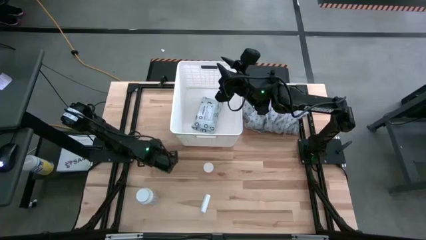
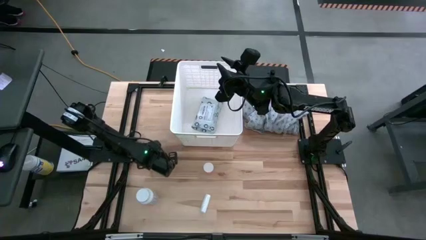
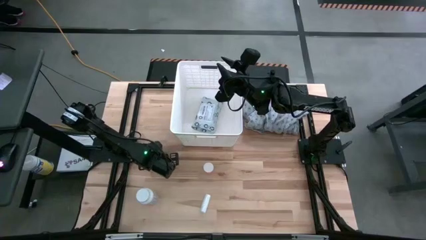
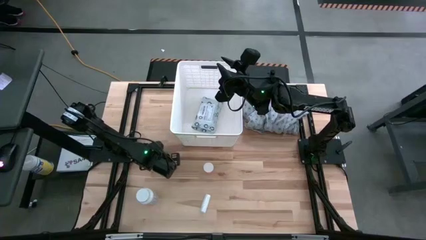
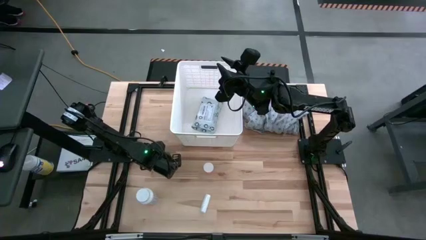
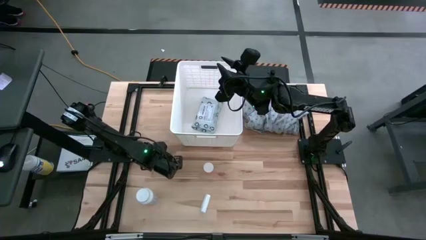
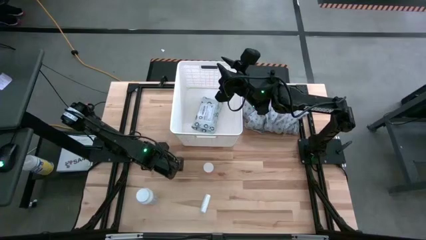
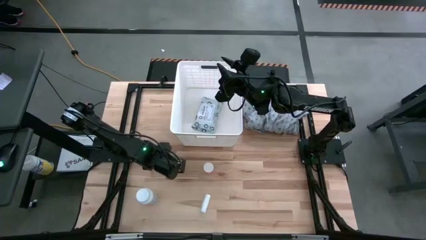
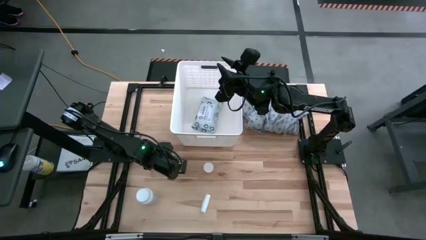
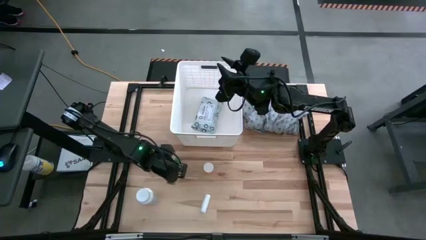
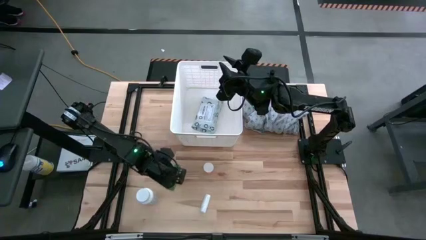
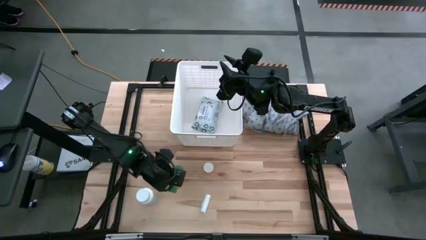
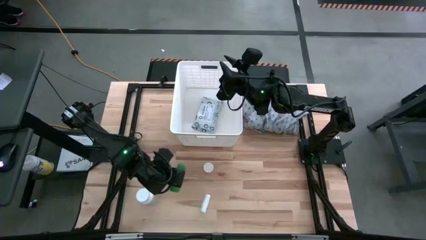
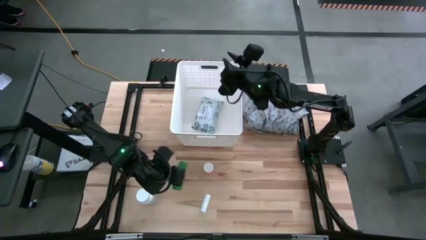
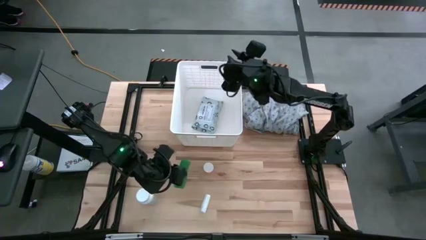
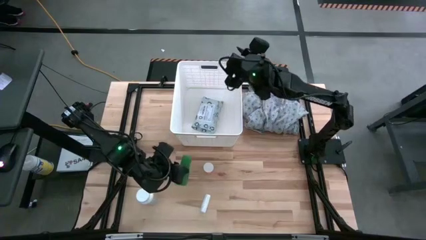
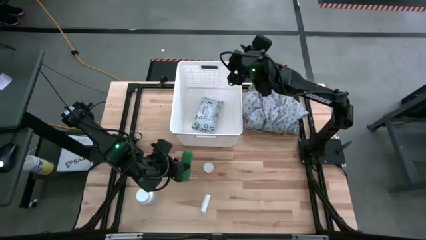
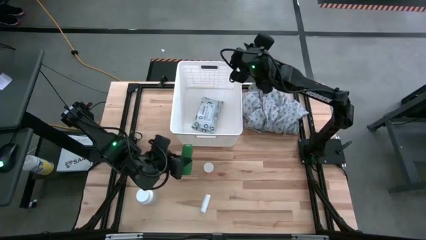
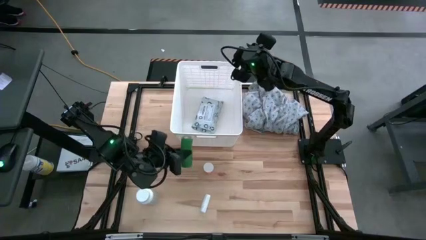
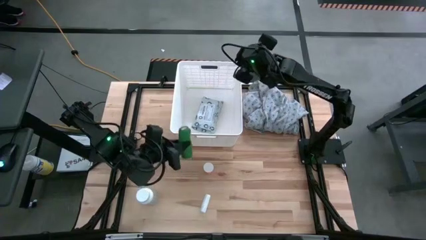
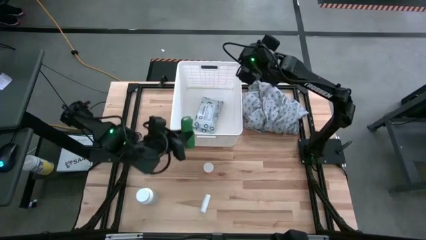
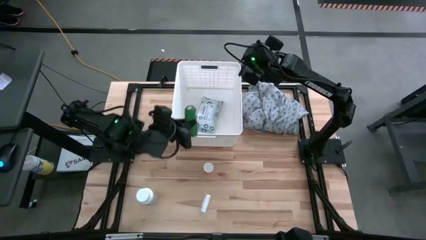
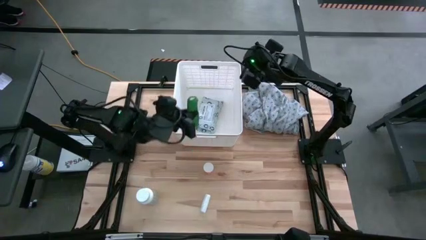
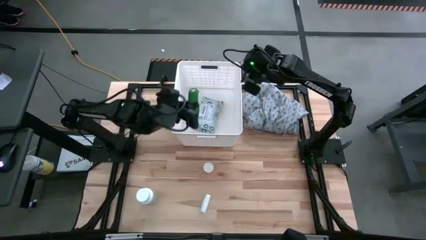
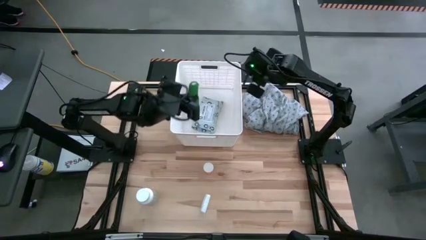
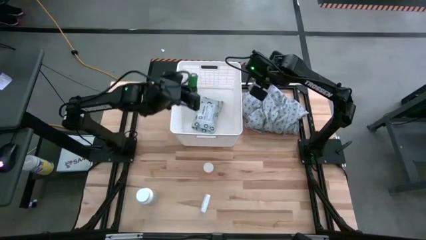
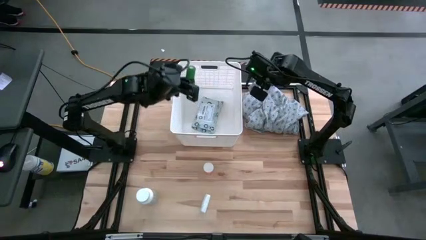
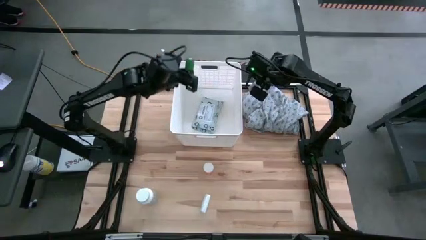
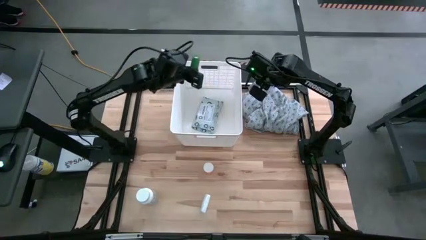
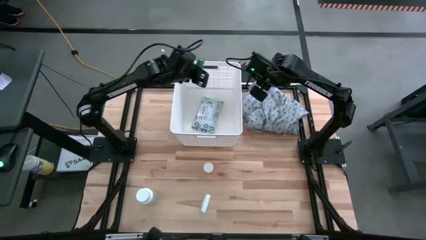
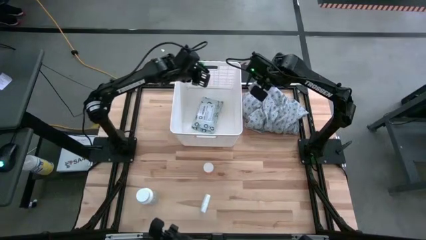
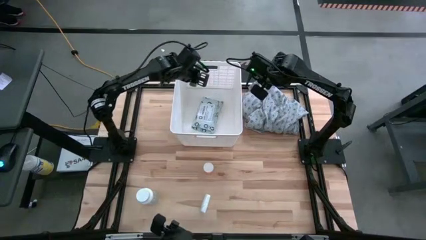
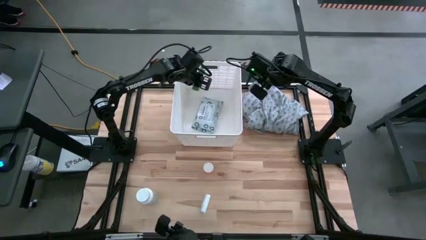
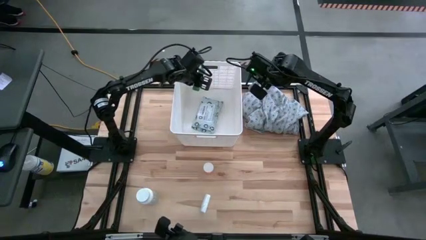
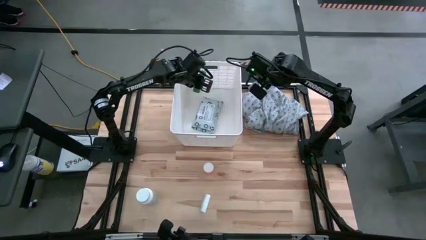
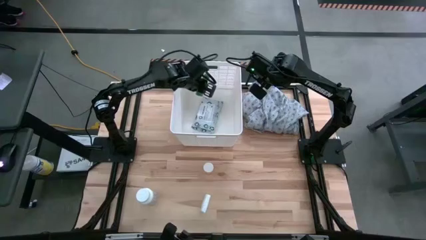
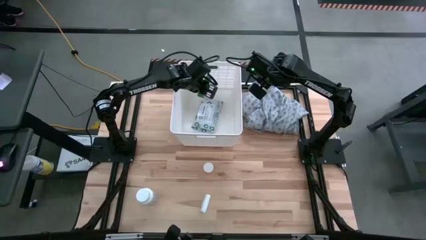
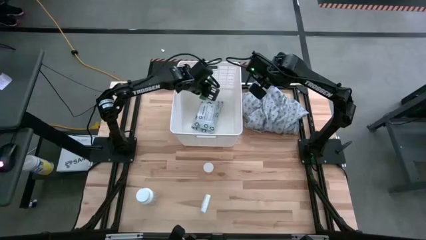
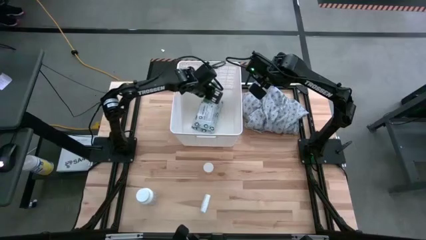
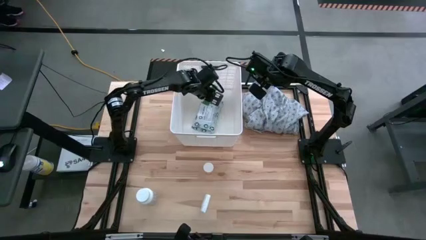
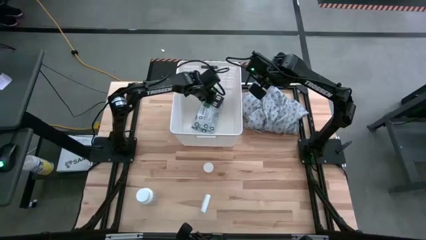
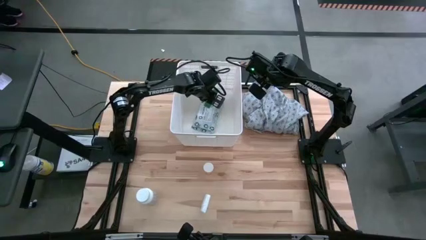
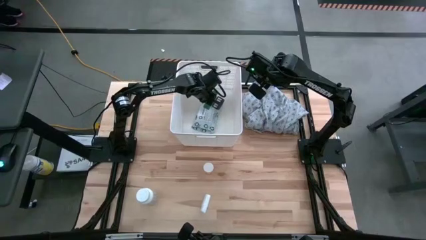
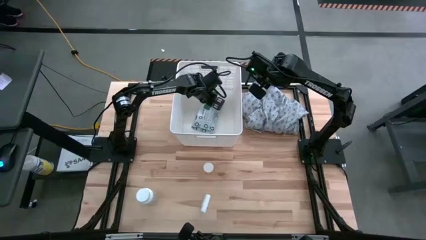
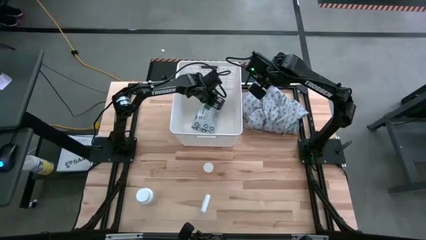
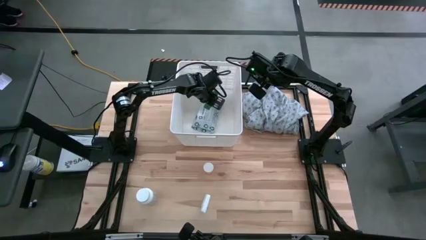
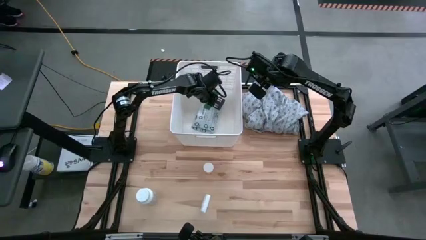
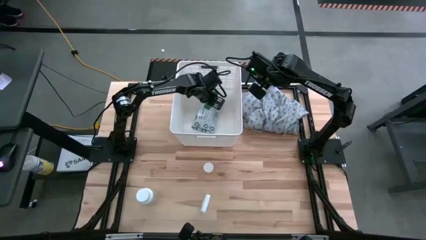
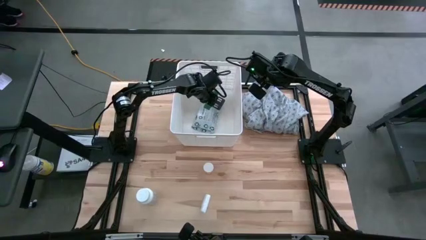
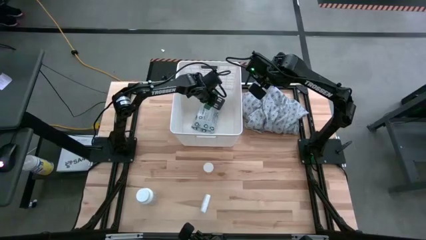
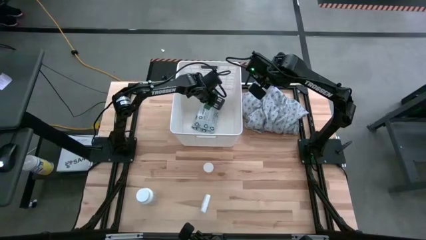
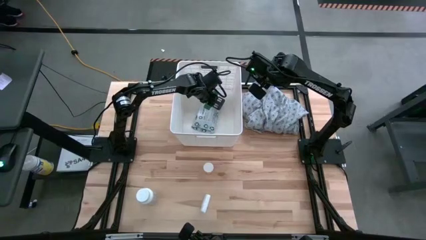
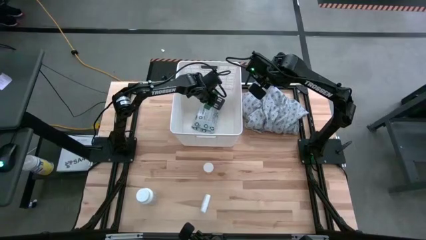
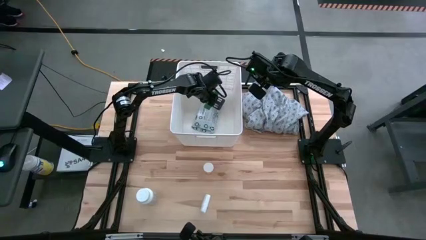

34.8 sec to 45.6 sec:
Task: Pick & place medical supplies in basket/bin
Put the green bandage into the white laundry organizer
